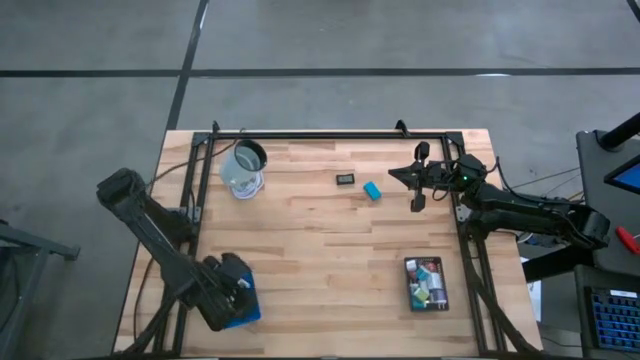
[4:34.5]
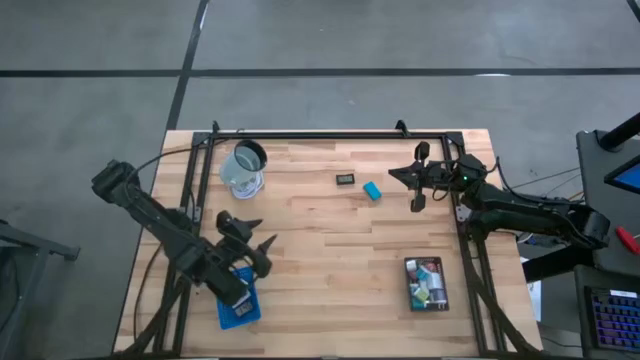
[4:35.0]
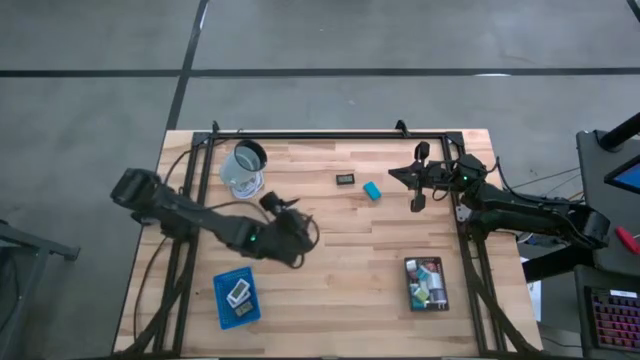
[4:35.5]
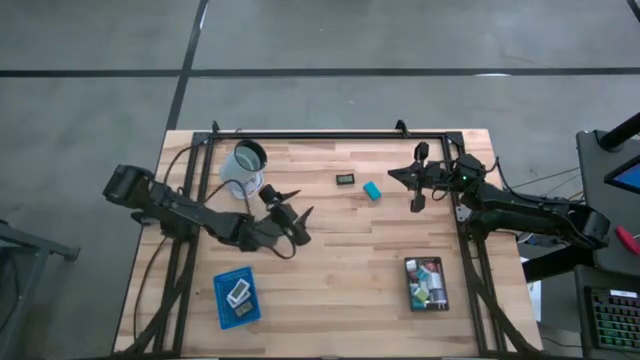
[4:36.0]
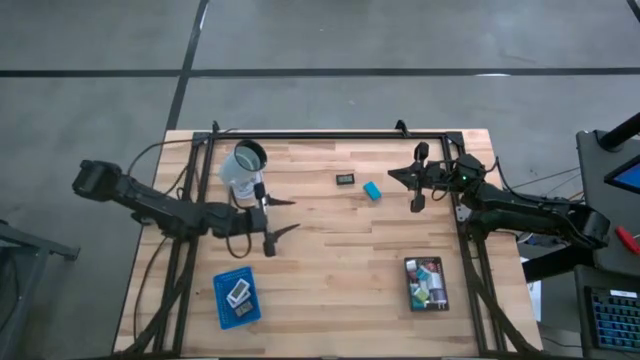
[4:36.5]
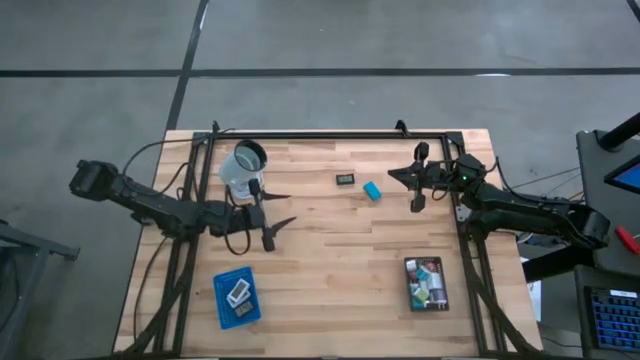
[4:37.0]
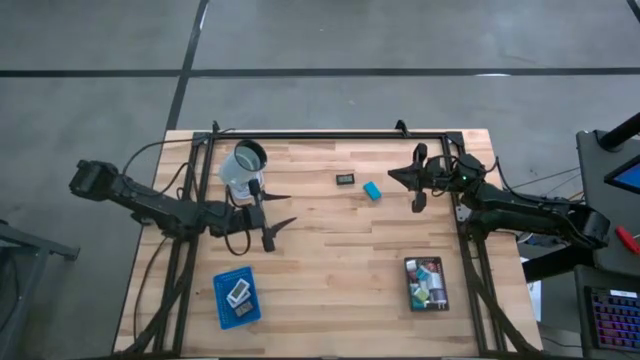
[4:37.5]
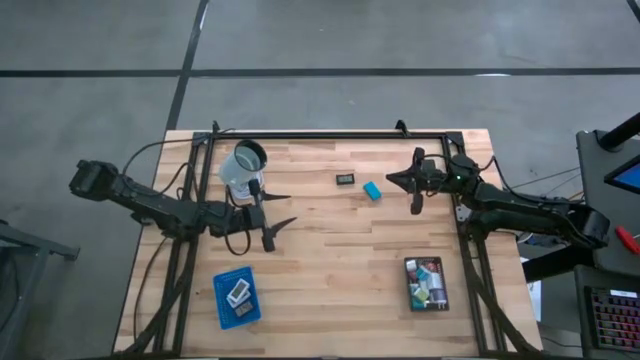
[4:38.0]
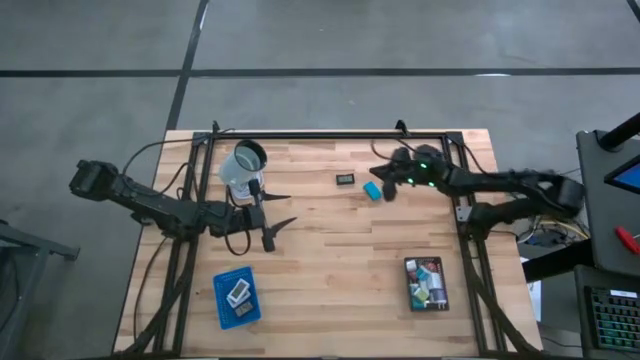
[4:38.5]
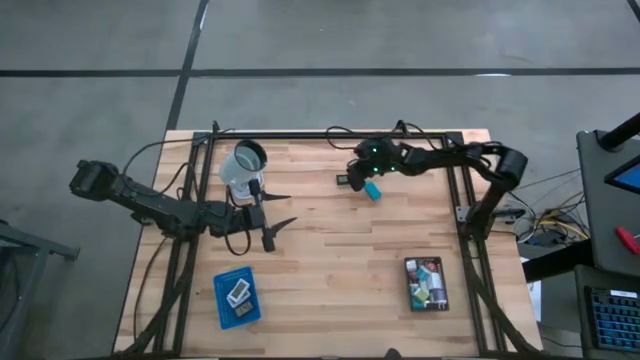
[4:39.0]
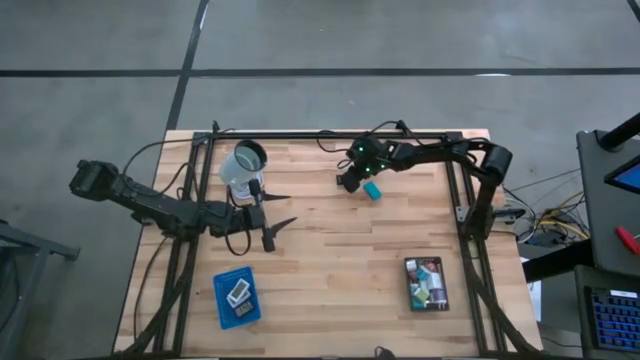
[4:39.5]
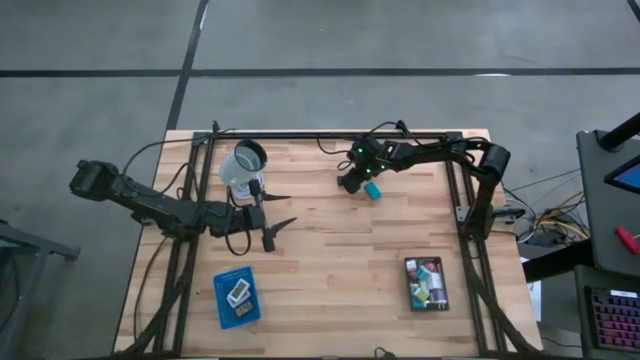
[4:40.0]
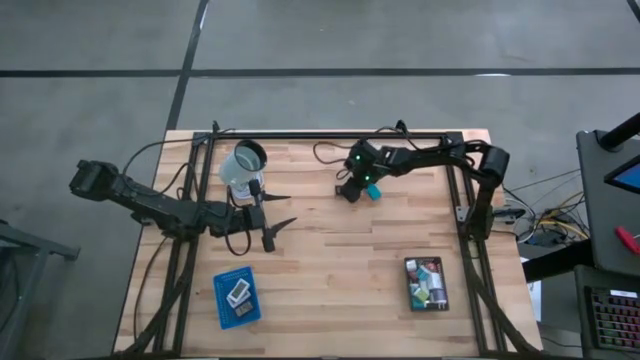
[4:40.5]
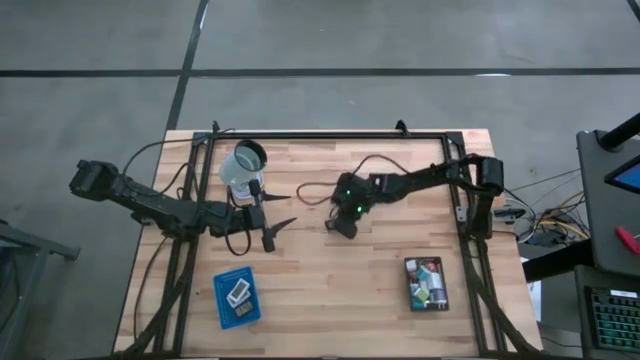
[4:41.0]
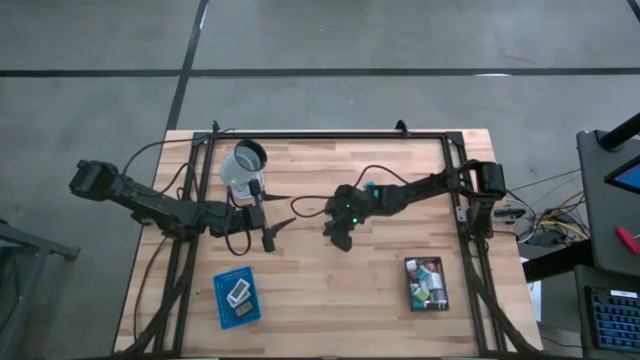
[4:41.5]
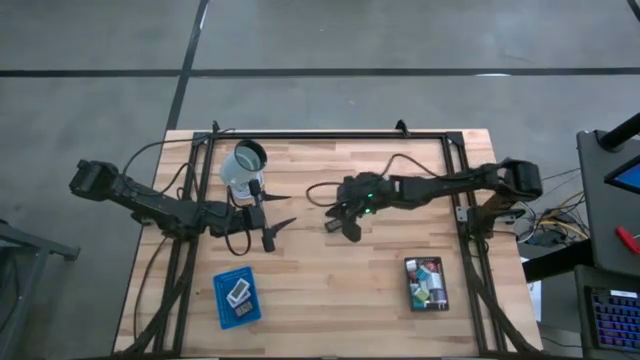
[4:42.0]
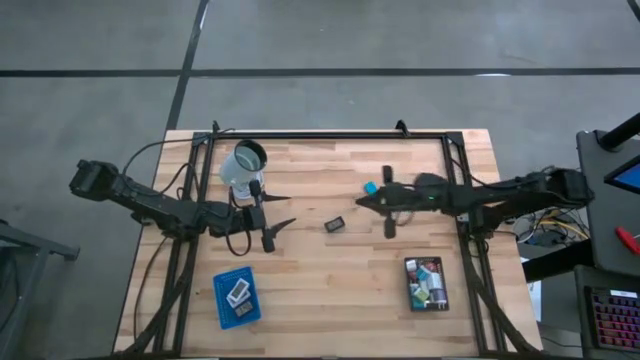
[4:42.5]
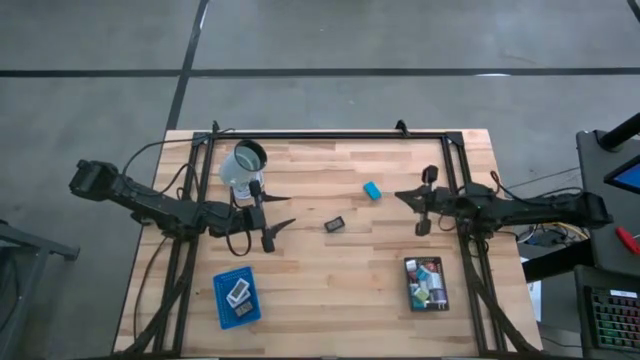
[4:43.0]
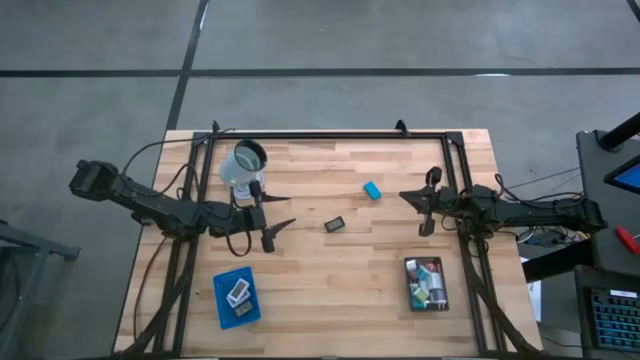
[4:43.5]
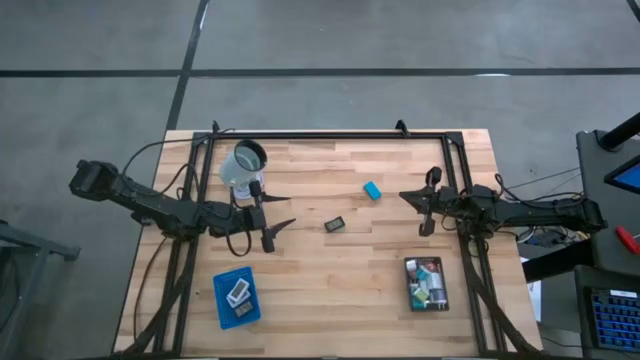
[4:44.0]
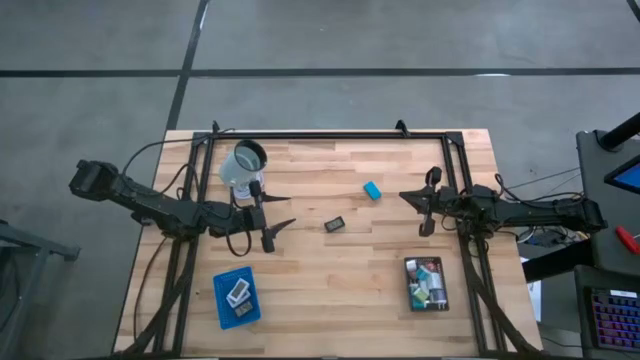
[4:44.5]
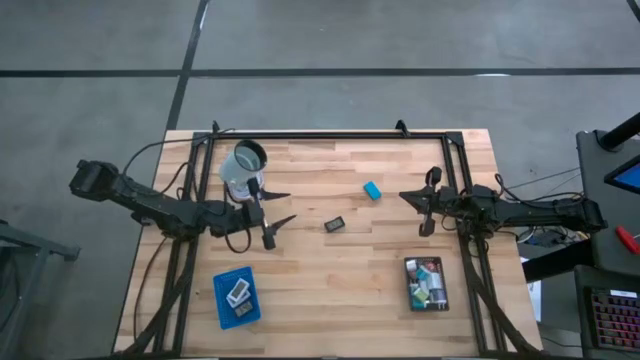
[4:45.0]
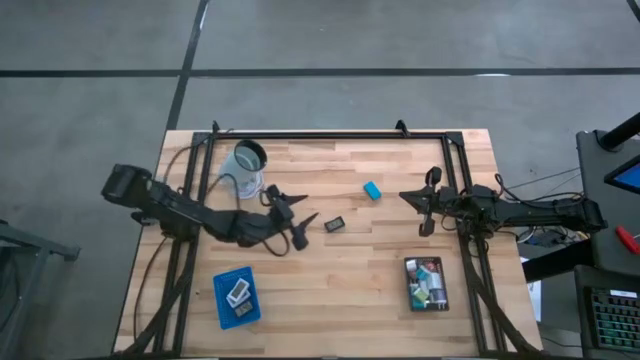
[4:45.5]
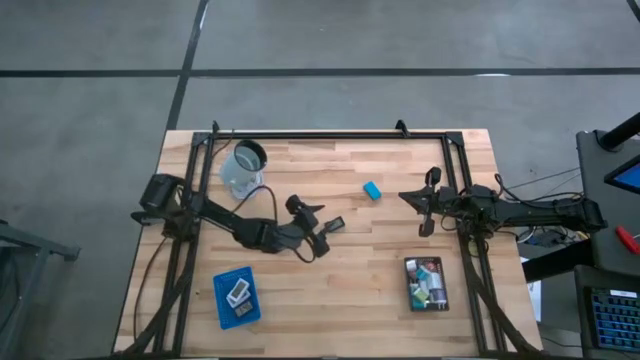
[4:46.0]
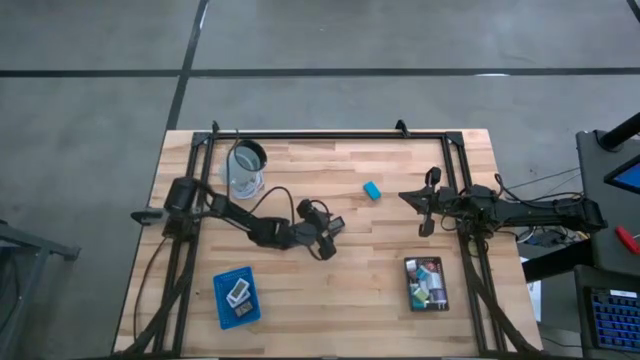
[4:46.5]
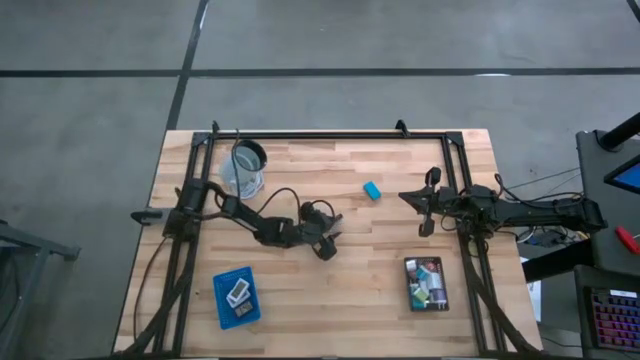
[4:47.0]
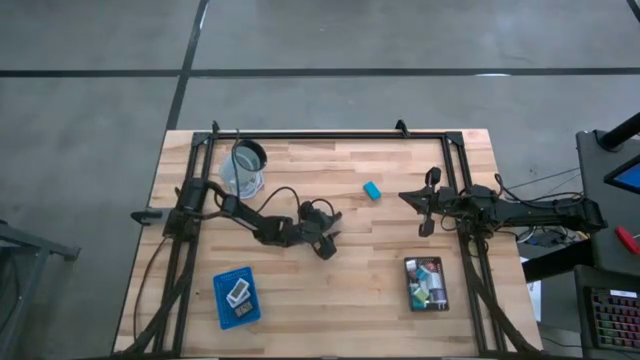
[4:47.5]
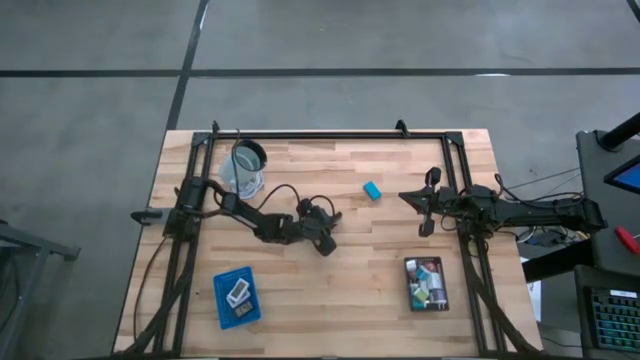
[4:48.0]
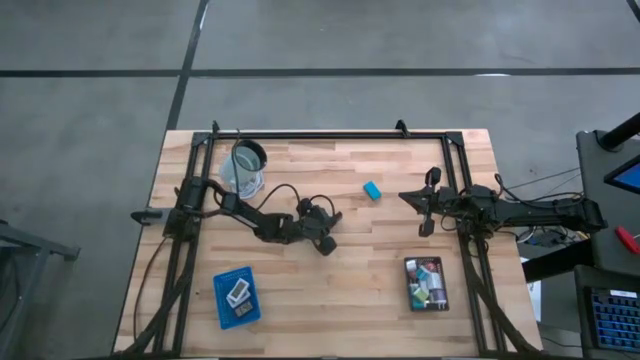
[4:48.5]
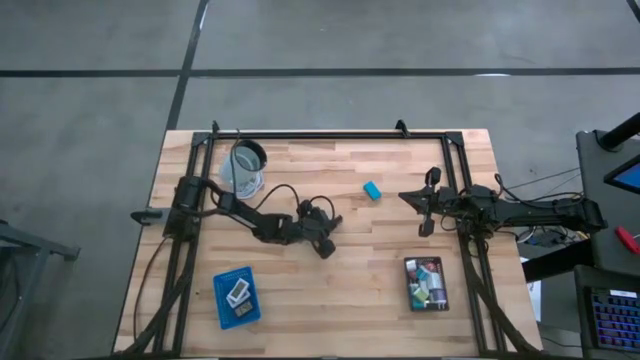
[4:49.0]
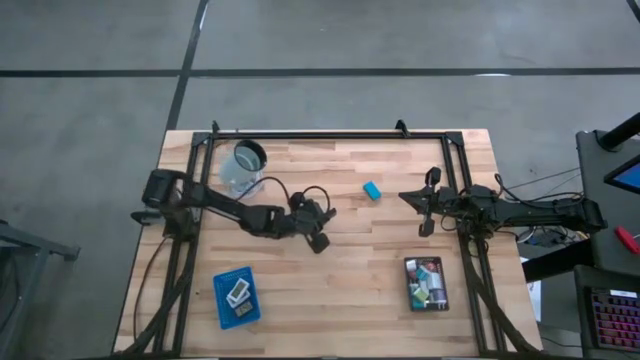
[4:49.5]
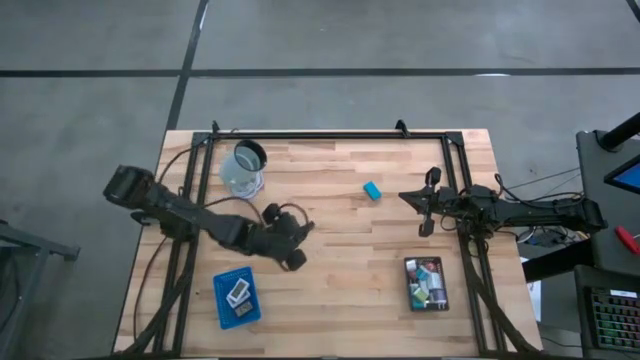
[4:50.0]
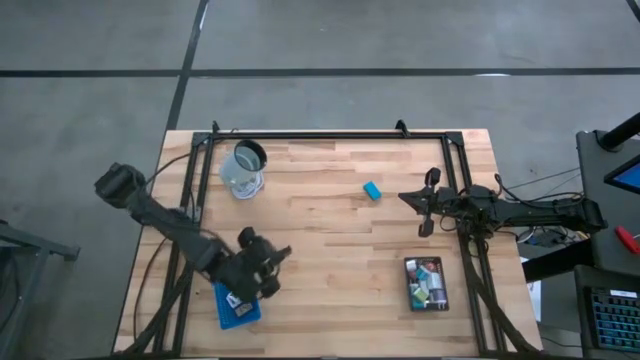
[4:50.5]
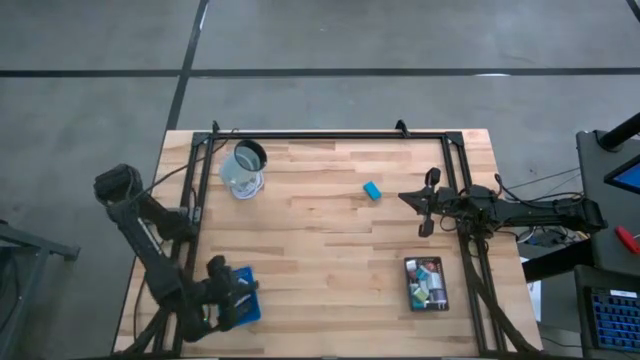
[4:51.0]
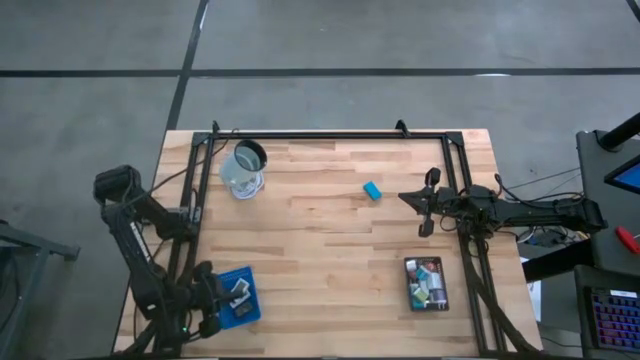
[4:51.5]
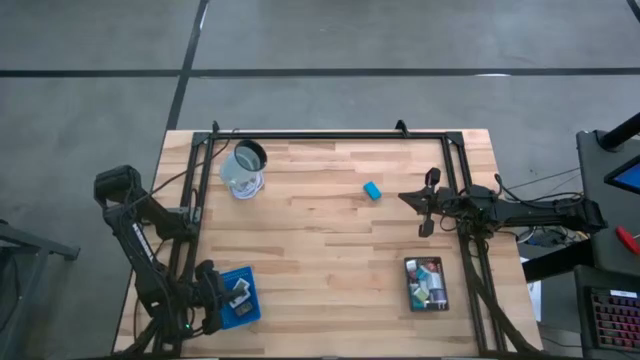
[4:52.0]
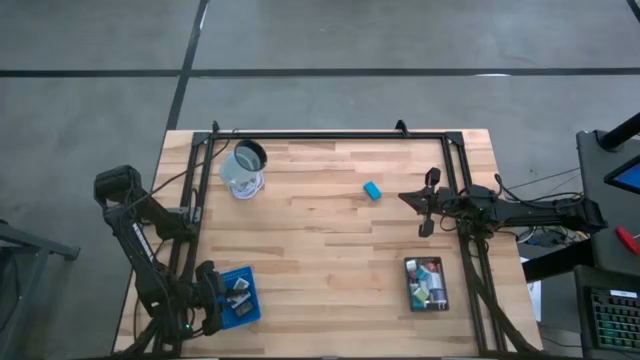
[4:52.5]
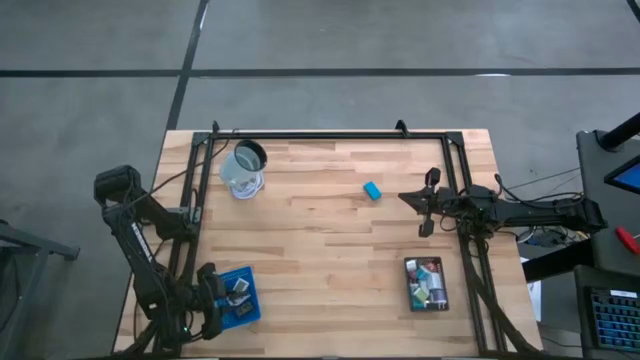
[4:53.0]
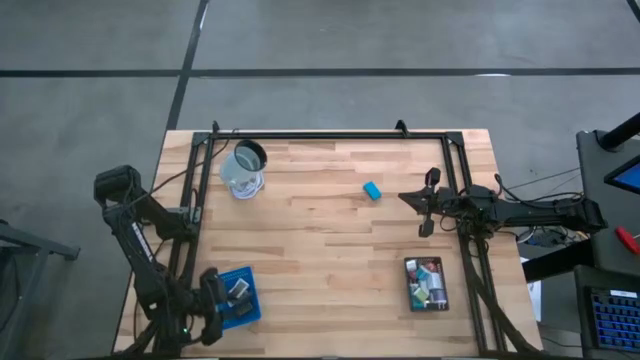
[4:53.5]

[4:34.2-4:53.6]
Task: Pick & Place Office items
Put the black digital clock into the blue bin
